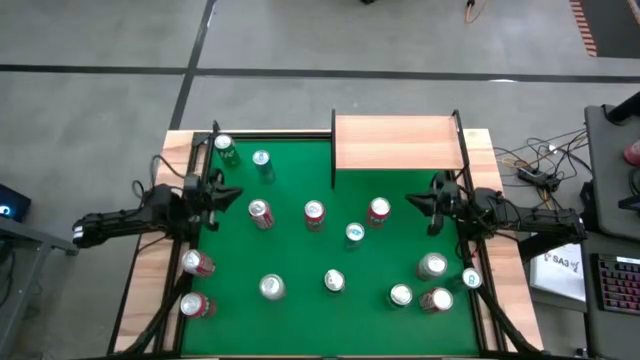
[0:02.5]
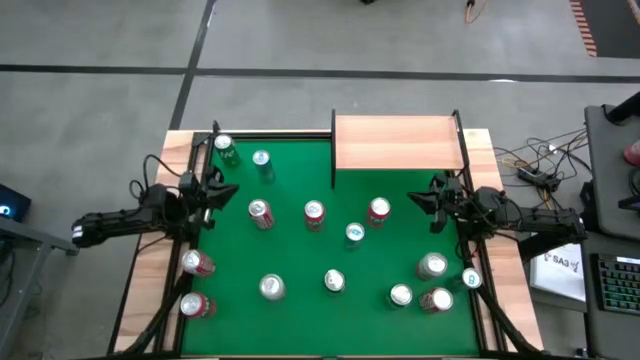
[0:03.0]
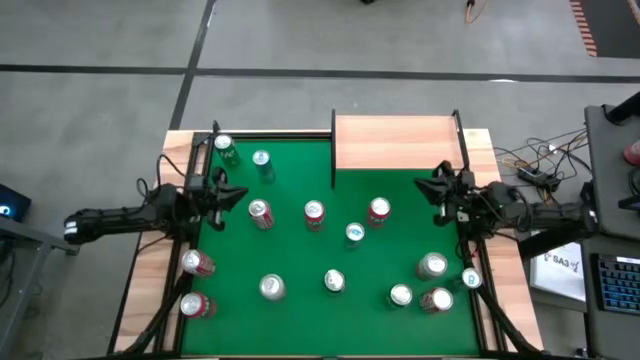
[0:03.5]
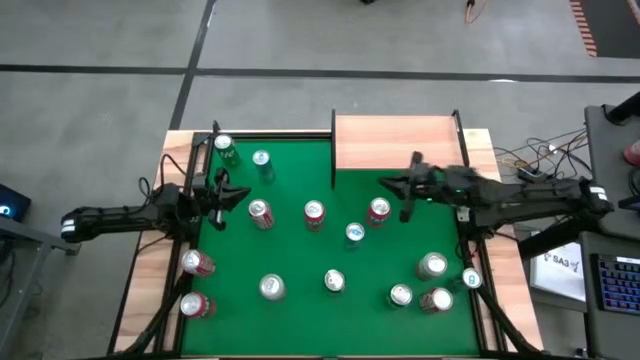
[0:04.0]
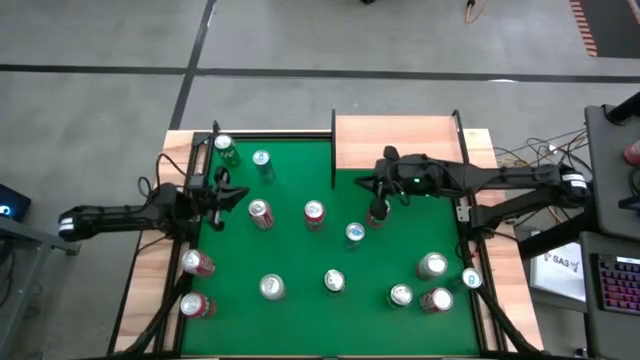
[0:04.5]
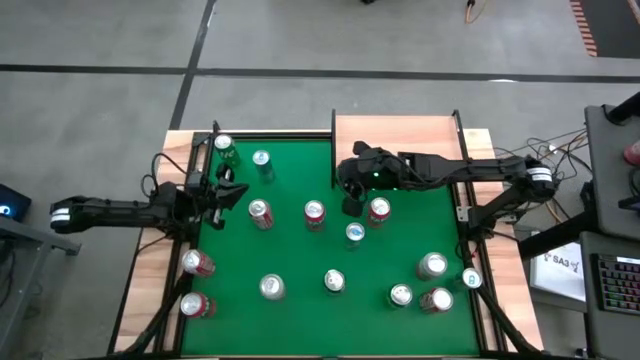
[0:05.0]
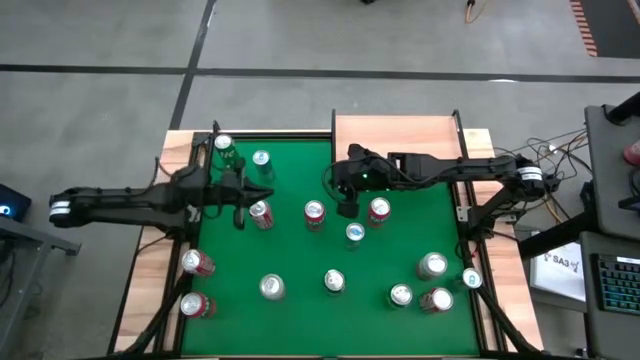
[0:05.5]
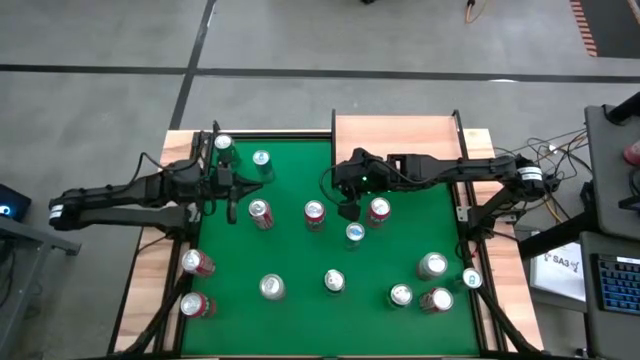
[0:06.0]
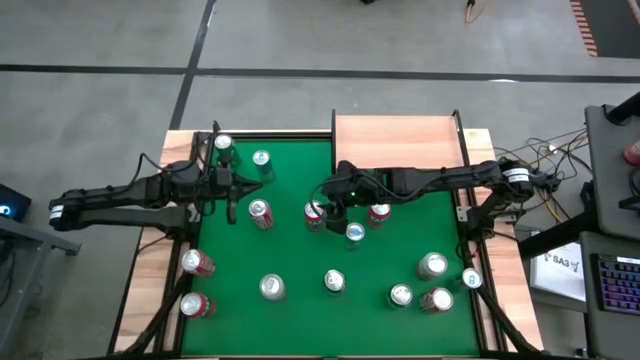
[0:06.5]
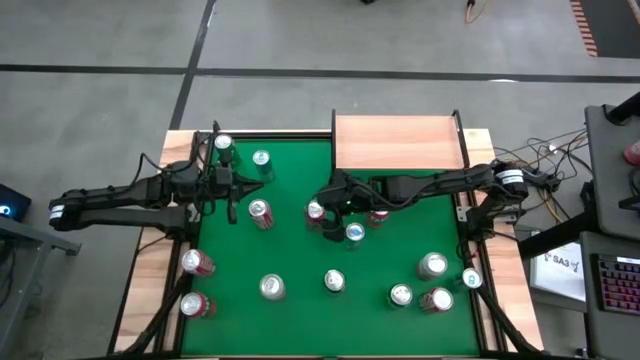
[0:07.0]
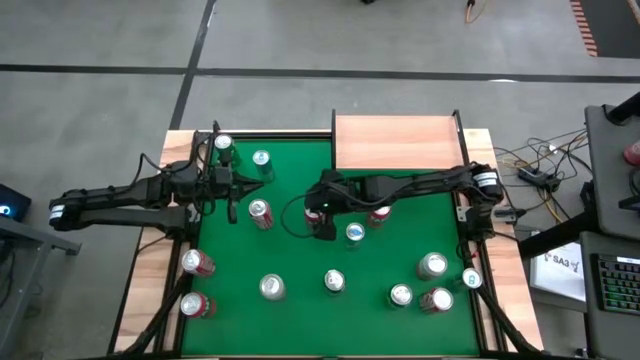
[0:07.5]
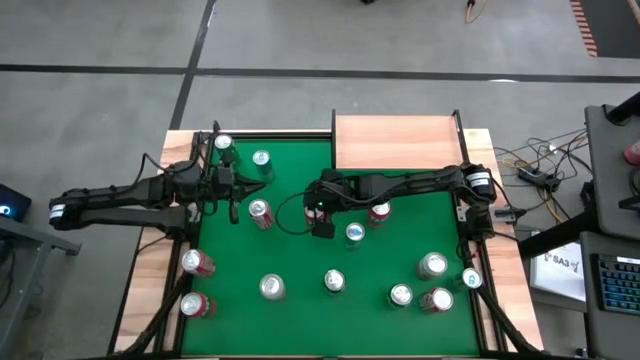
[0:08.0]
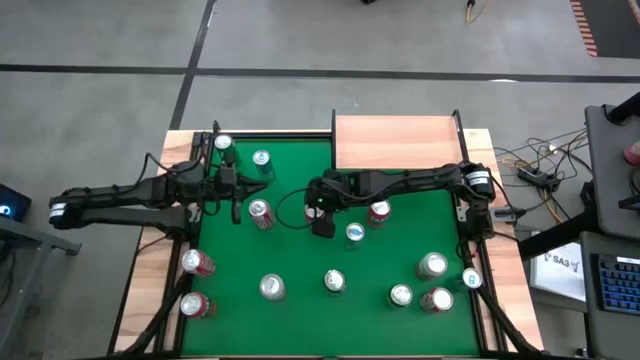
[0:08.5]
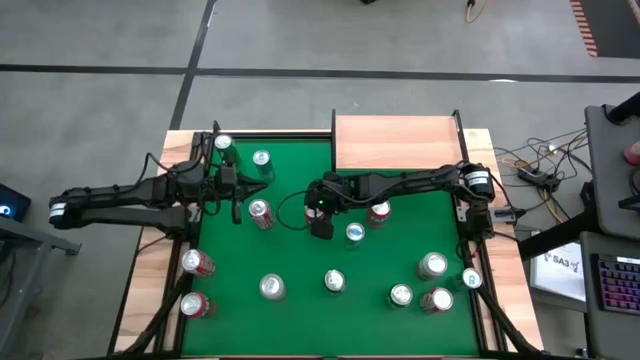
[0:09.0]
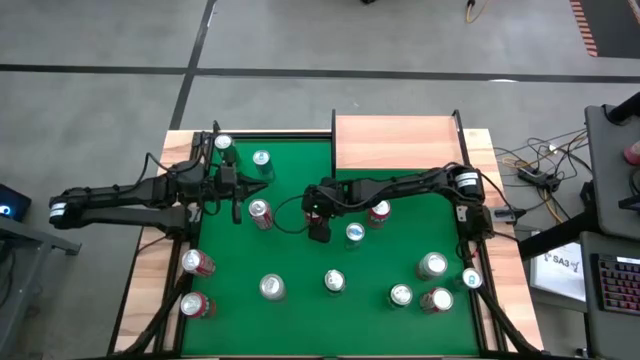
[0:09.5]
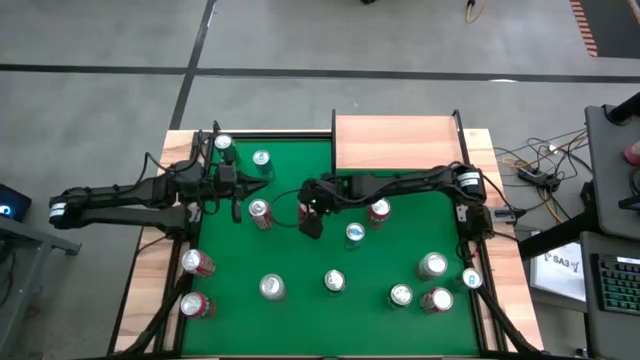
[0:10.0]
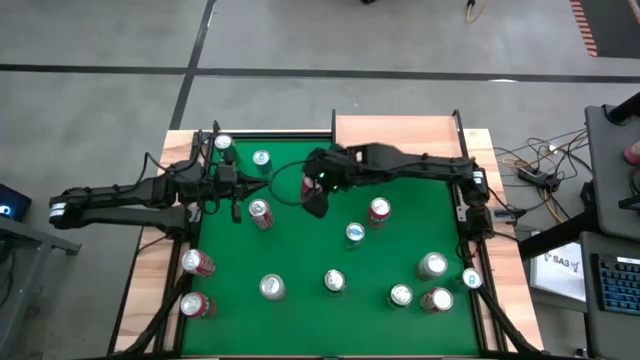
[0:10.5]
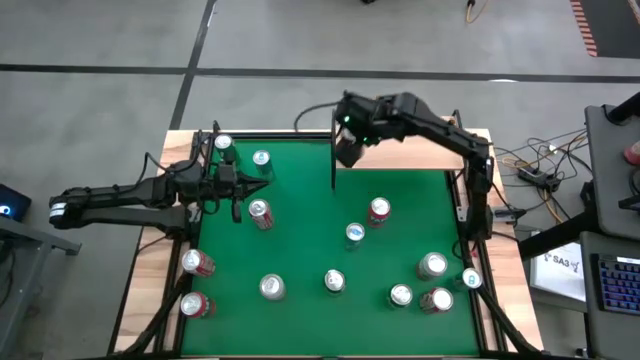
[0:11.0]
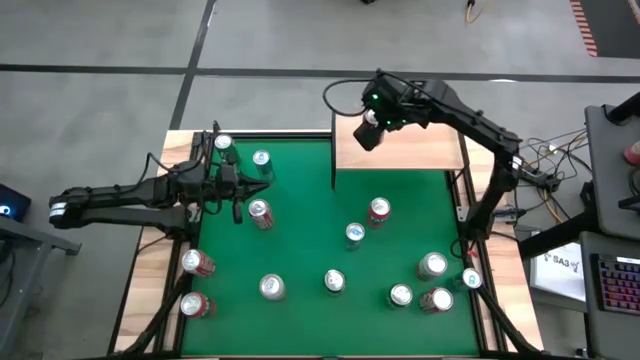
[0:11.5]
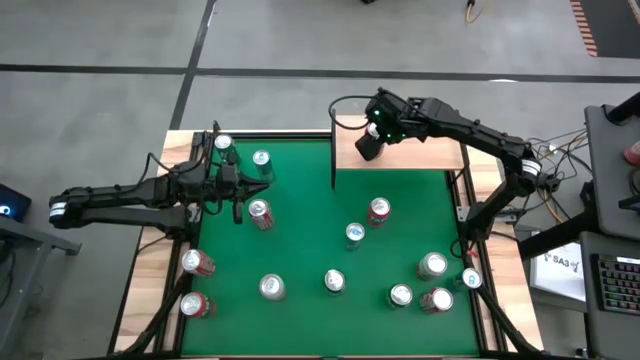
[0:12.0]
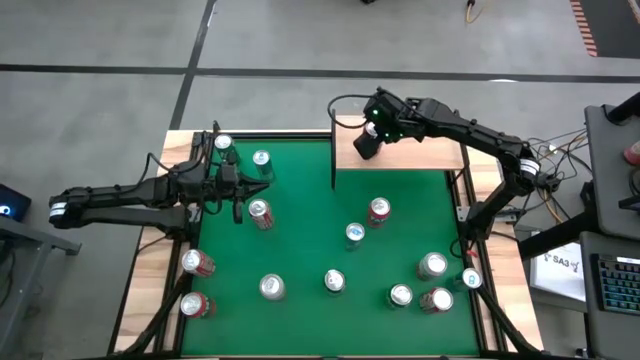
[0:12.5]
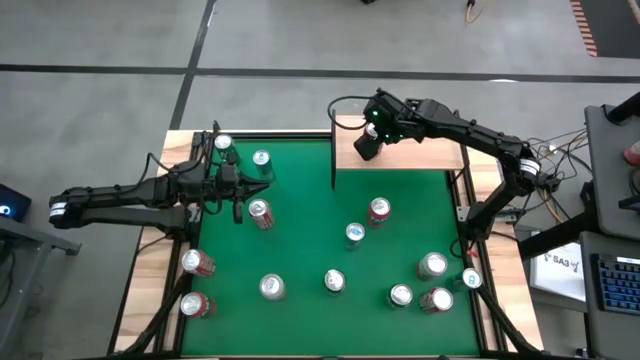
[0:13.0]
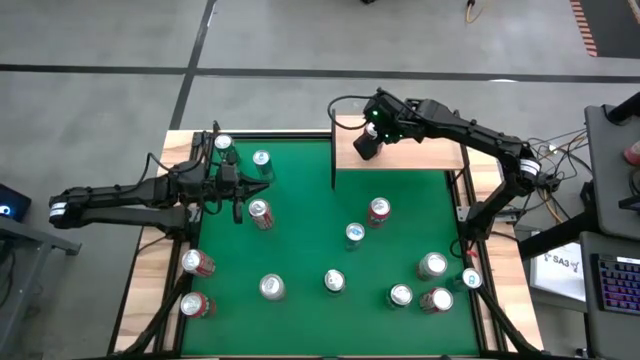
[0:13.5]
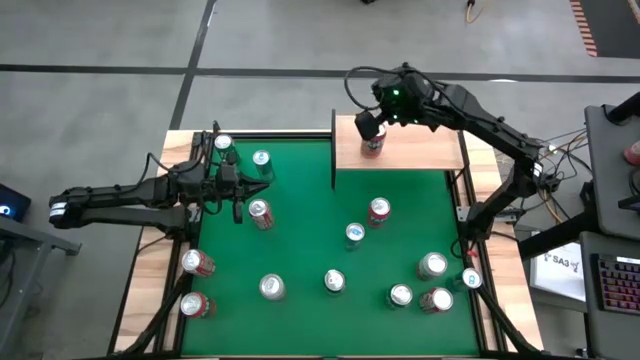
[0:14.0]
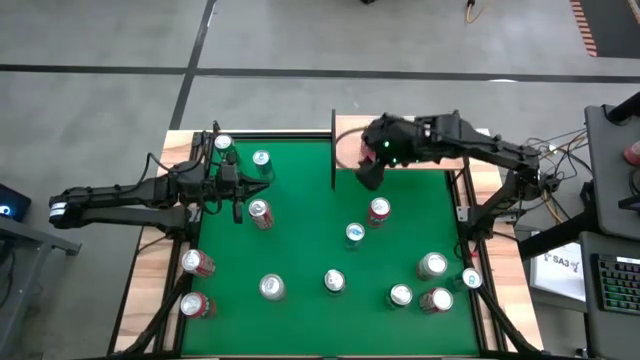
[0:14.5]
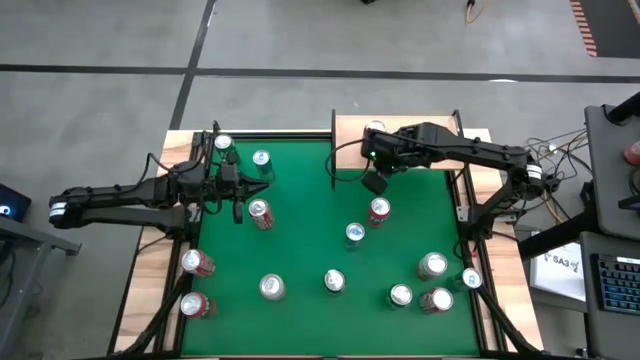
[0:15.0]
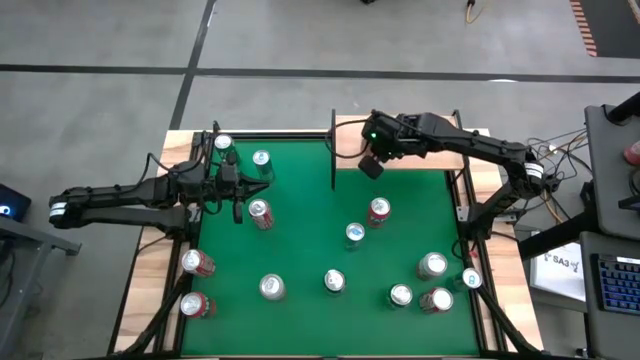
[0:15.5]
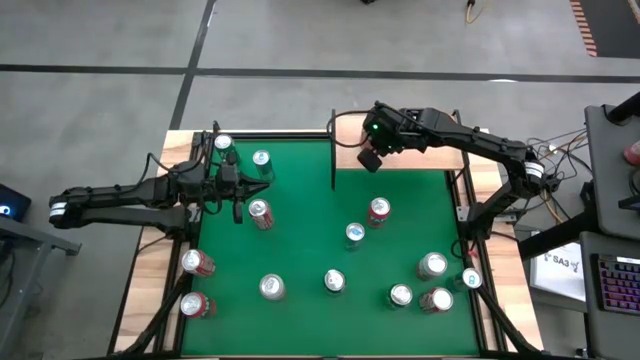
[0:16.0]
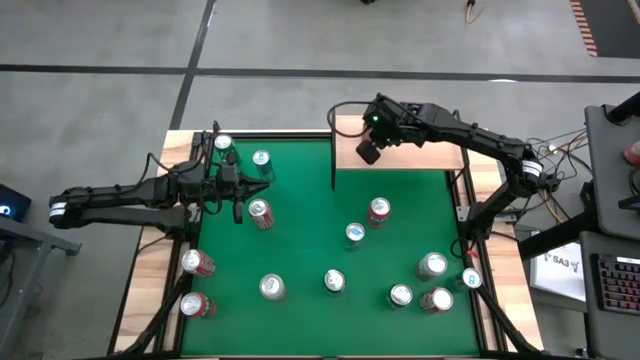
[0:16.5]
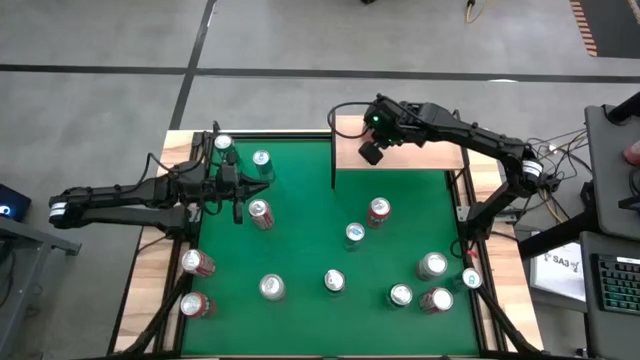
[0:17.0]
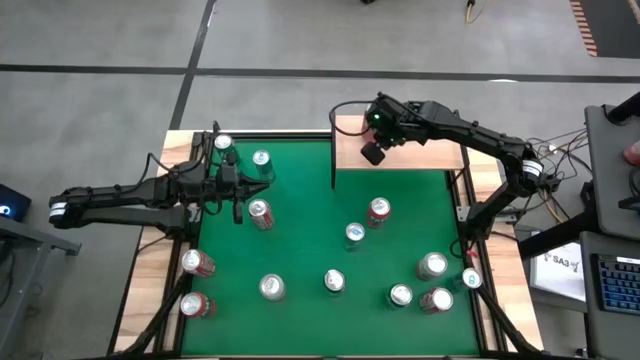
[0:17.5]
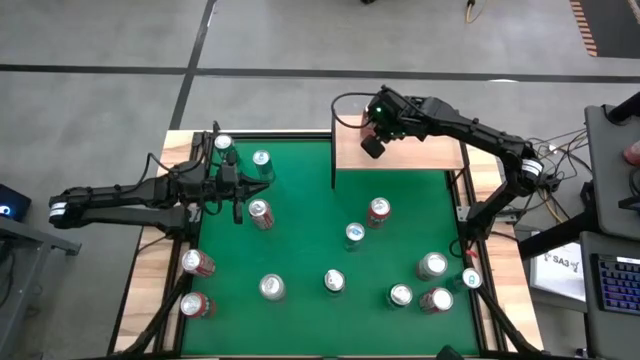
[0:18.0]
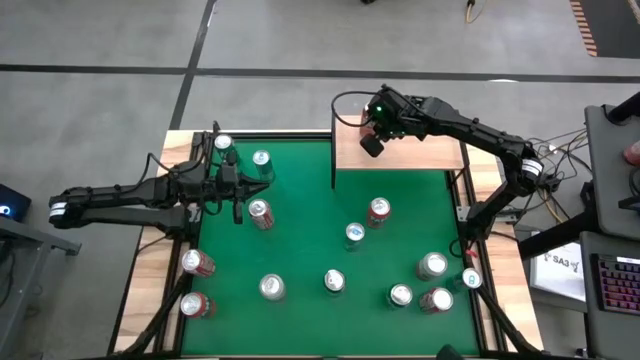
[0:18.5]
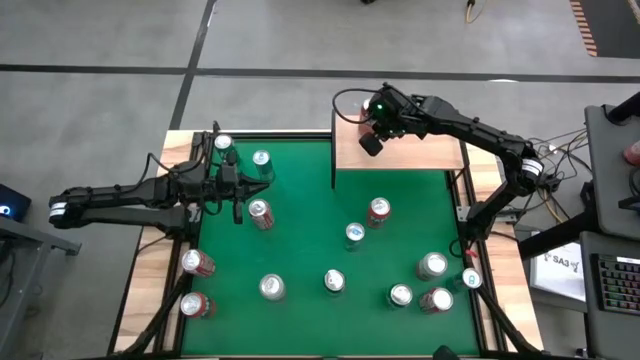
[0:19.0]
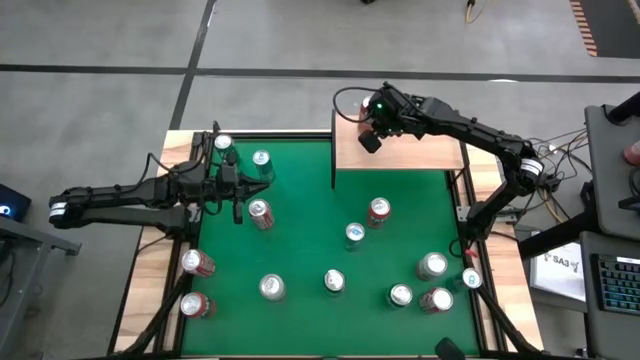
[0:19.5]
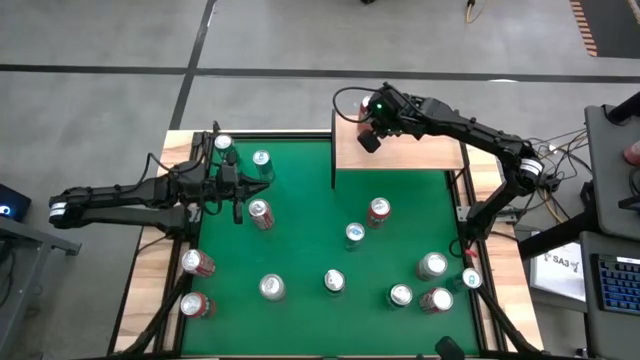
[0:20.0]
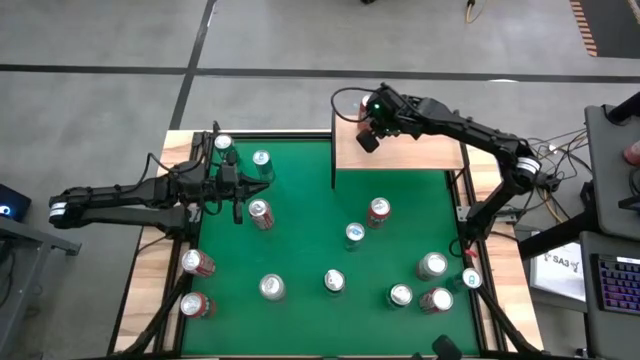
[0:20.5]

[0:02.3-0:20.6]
Task: Place canned beverage on shelf
Put the top left red soda can on the shelf

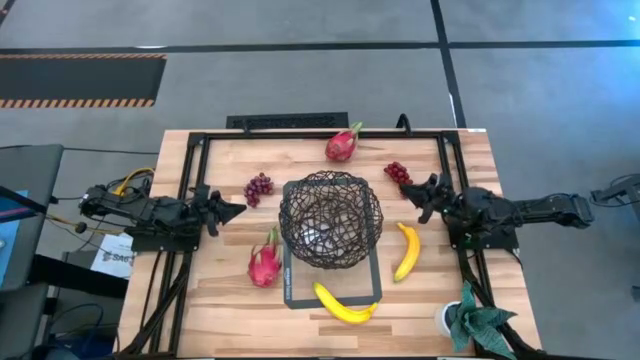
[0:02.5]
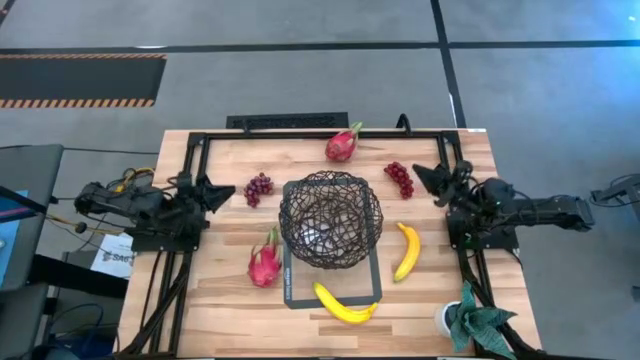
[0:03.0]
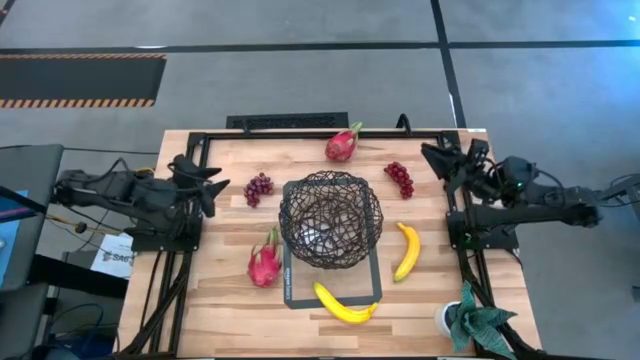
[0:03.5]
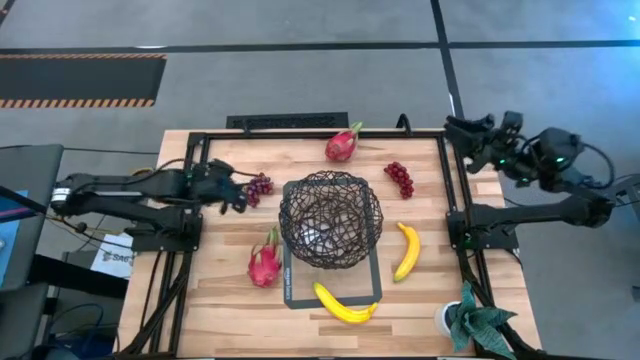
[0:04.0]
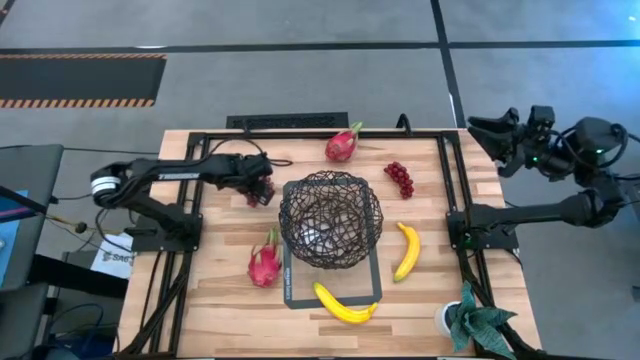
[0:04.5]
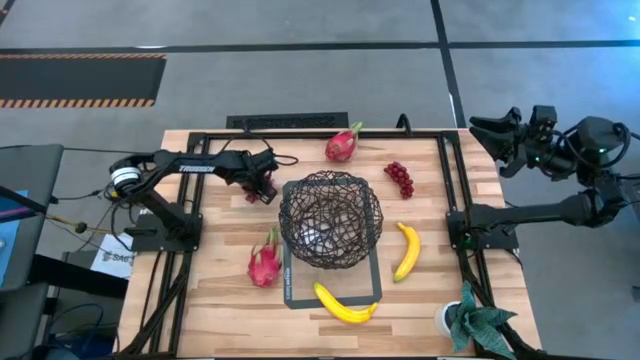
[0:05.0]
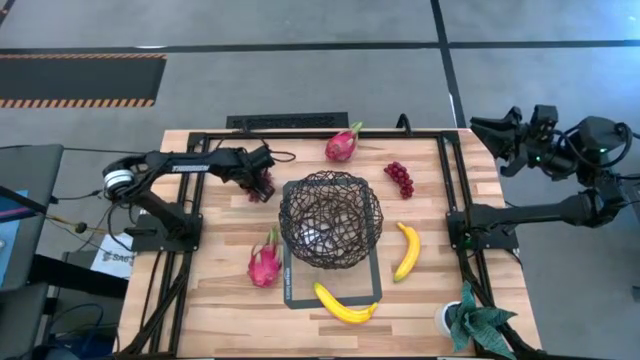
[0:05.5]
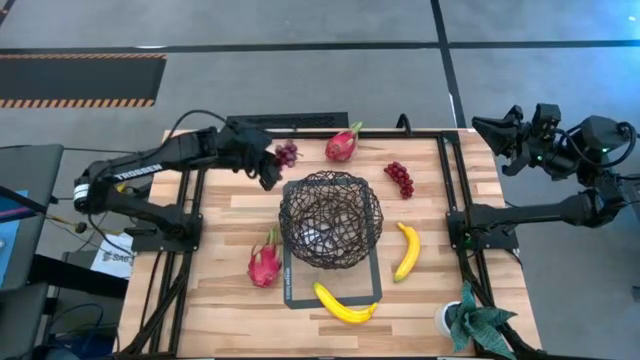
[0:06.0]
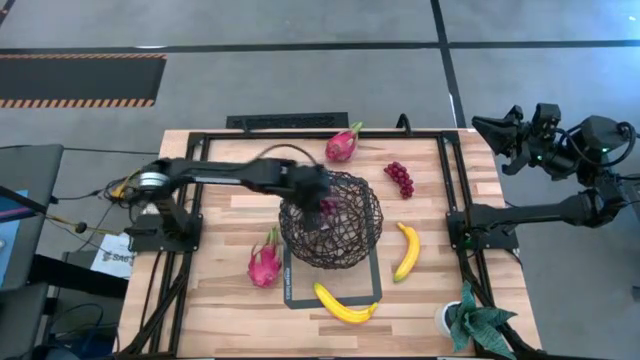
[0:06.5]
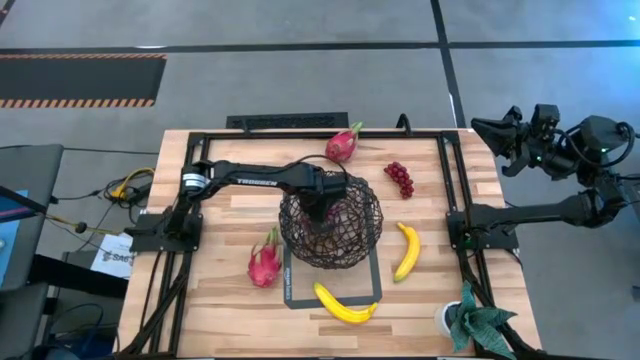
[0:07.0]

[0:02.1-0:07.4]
Task: Build produce basket
Put the left red grapes into the black wire basket
